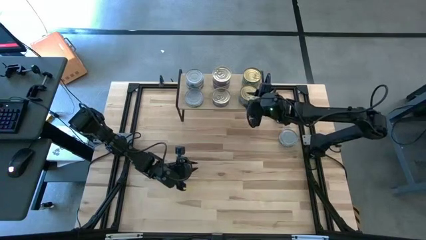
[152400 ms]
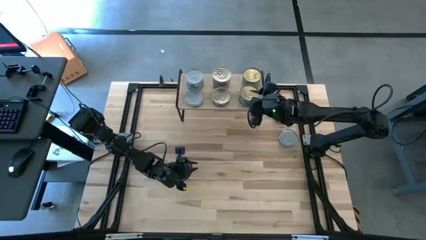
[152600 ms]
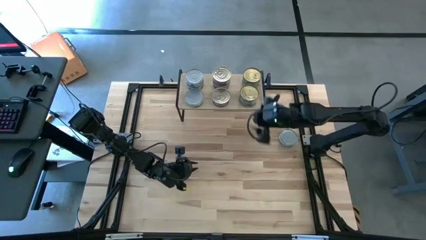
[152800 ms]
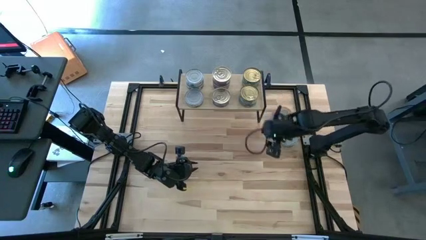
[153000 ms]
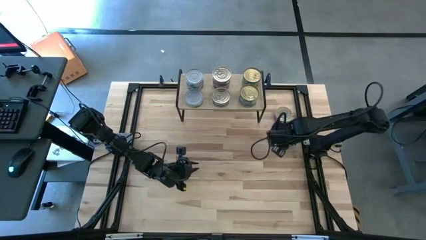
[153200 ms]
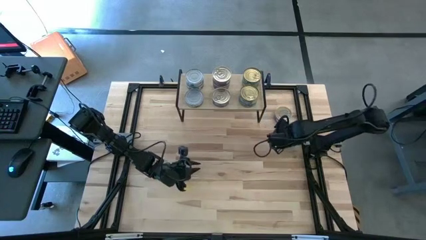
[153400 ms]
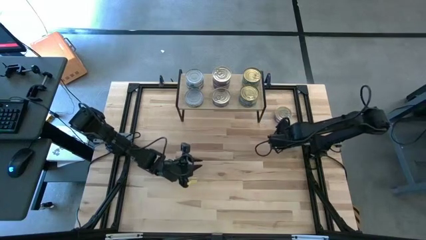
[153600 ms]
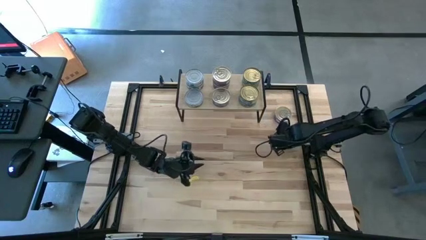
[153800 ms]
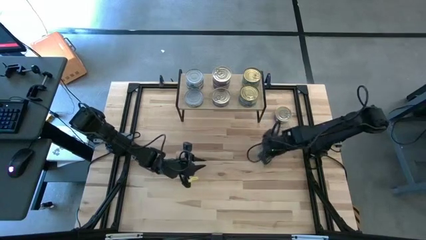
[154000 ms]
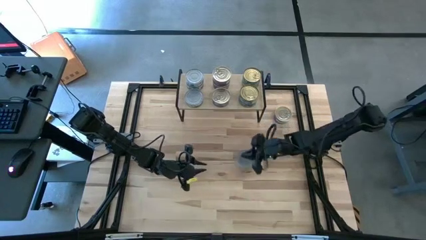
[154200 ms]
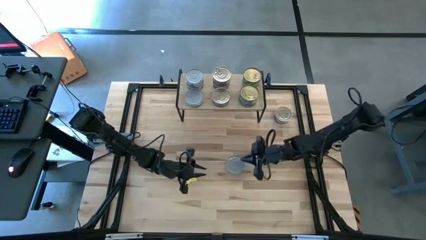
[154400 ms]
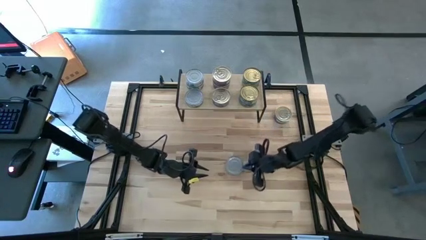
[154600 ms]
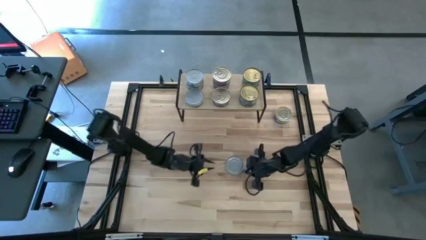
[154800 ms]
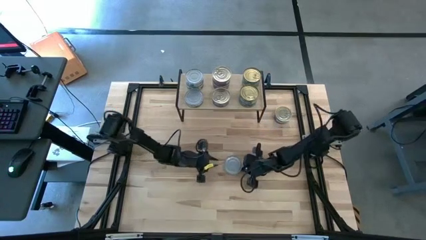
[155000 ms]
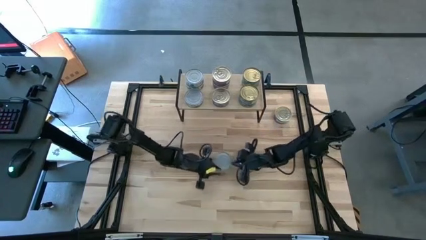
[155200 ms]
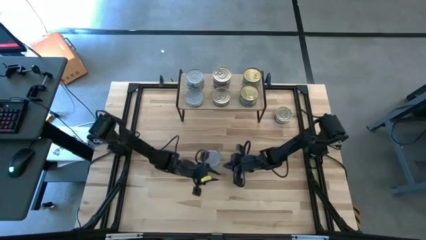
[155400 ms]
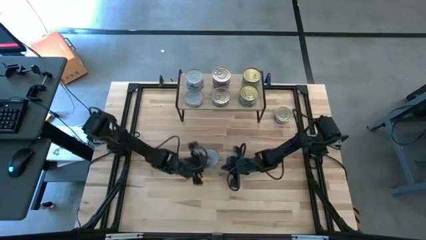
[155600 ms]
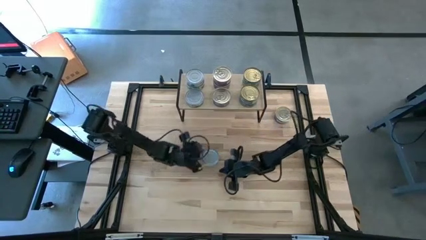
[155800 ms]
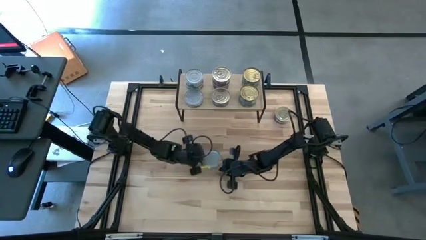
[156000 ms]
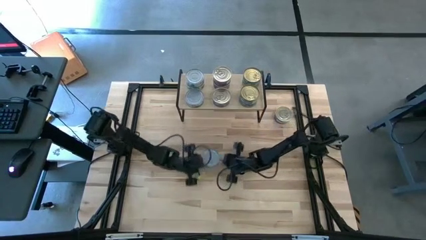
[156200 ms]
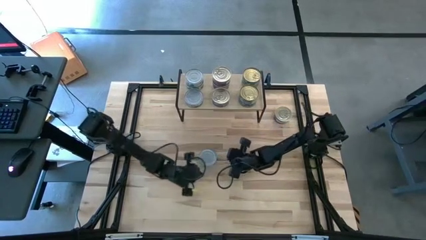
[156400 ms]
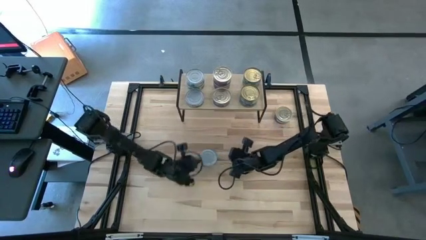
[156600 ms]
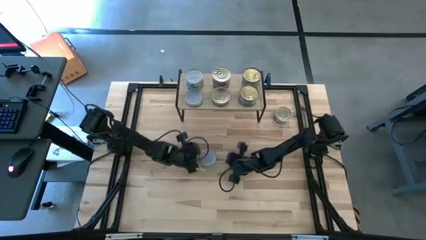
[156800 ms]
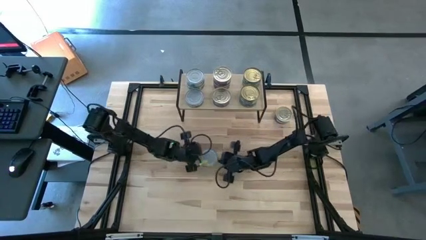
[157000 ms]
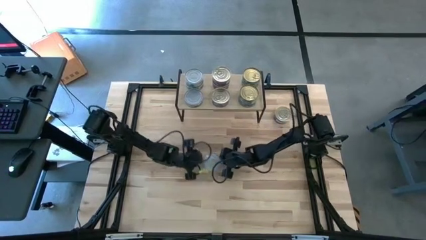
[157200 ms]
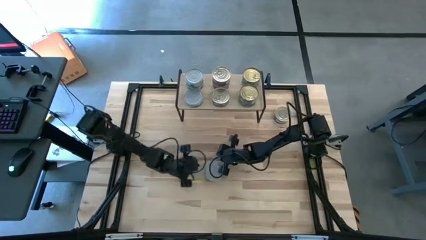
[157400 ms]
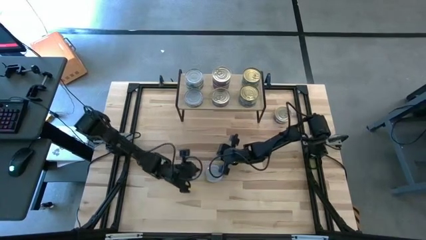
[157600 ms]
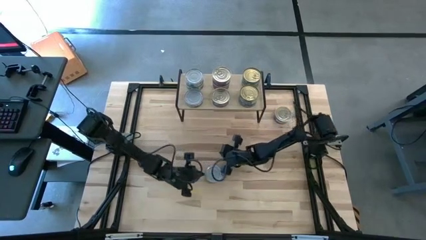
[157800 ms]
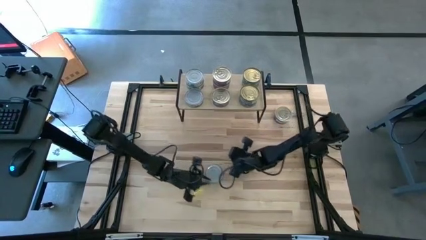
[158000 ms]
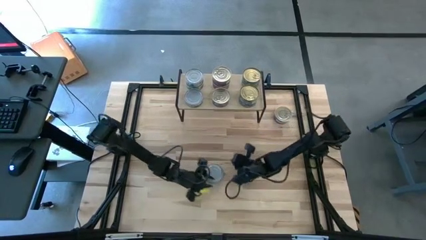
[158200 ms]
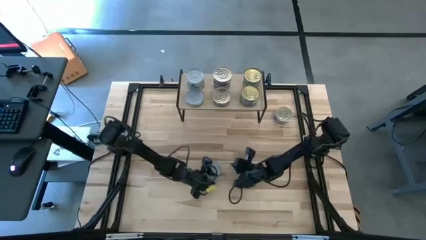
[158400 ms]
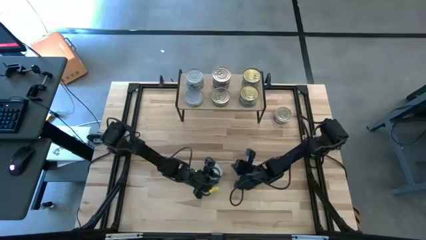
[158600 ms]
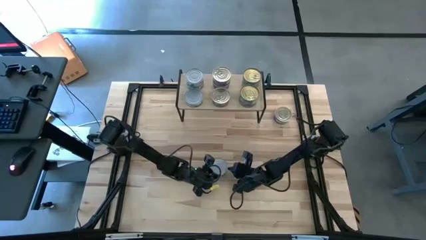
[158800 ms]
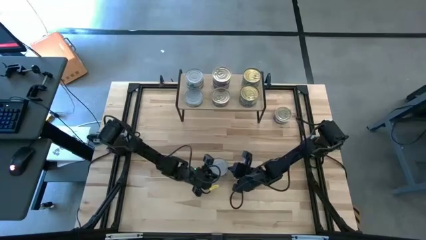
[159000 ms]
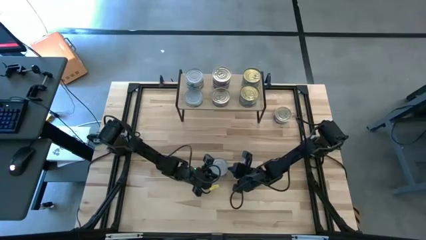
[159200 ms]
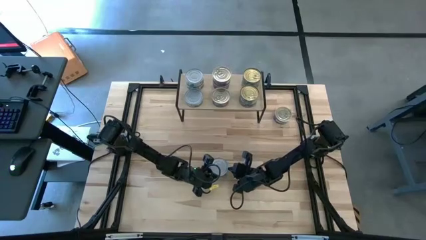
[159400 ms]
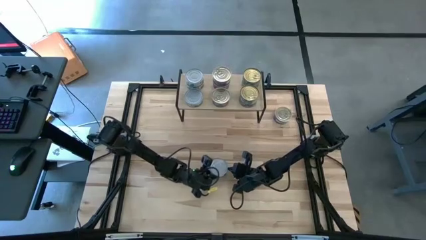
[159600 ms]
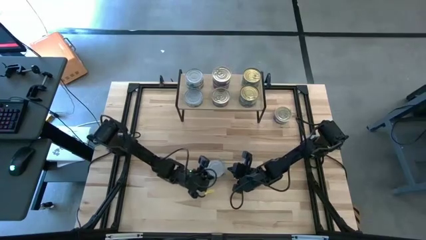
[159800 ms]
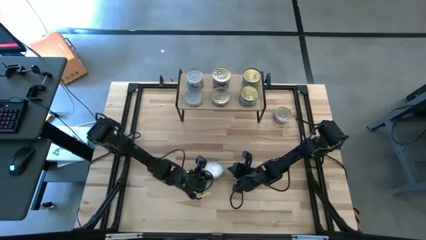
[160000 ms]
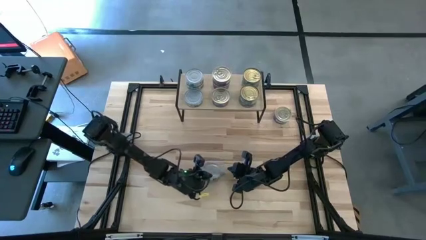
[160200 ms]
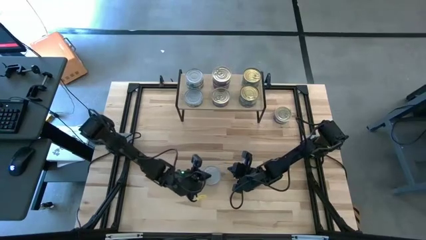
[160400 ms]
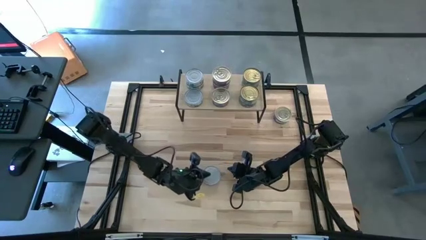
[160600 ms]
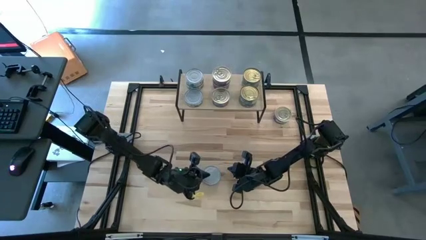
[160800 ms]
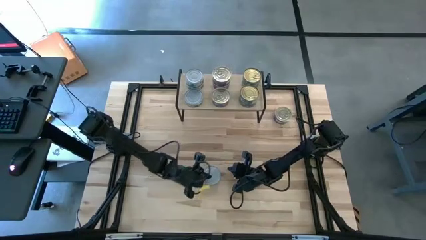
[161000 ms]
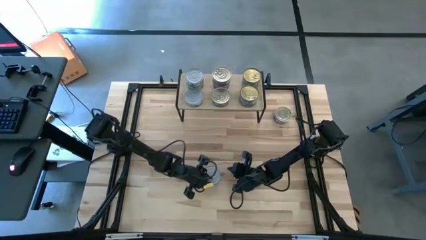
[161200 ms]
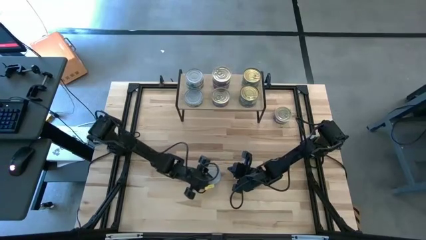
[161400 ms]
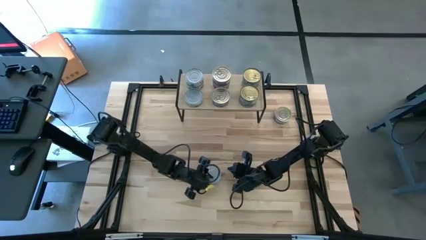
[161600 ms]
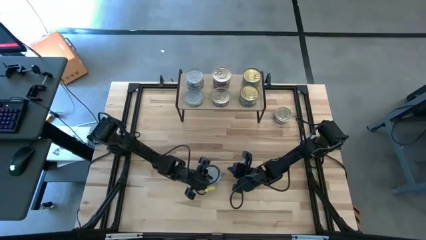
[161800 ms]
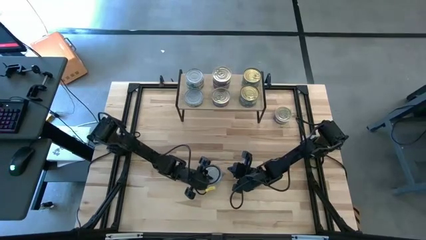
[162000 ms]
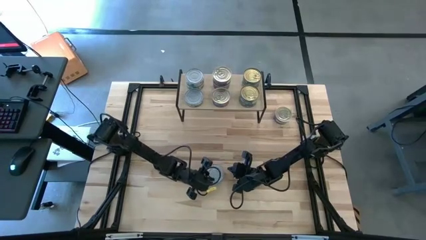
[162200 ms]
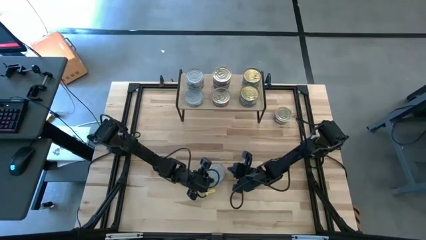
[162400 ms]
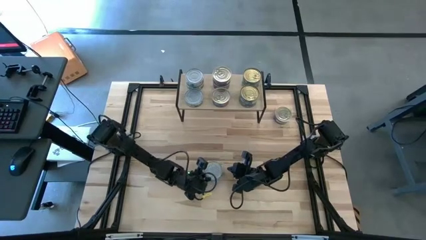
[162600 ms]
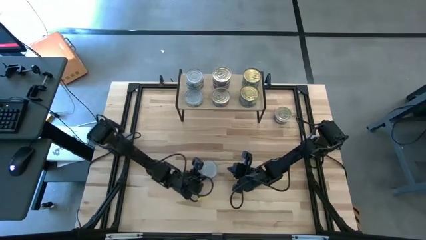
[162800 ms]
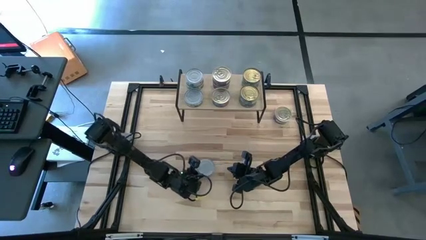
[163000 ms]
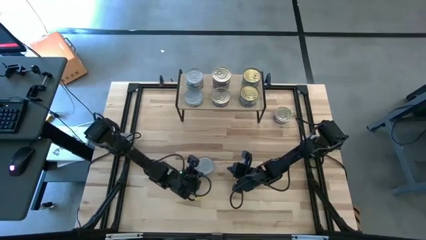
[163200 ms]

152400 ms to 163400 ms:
Task: Stack canned seafood by type on shelf
Stack the green white tuna can on top of the other green white tuna can on the shelf

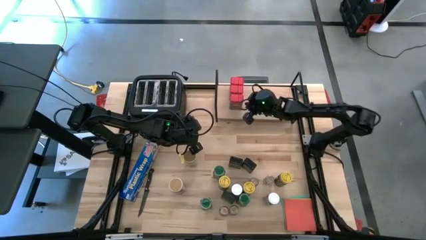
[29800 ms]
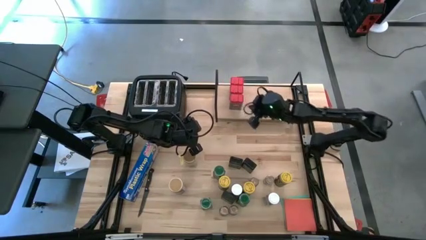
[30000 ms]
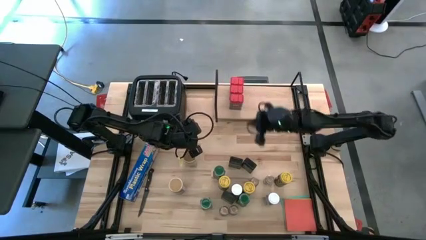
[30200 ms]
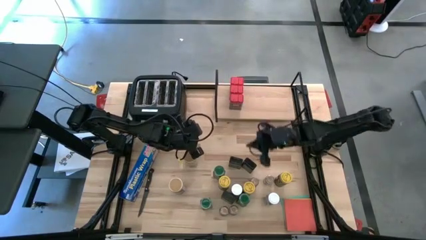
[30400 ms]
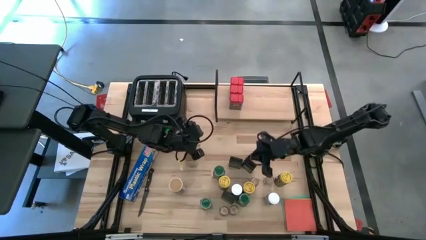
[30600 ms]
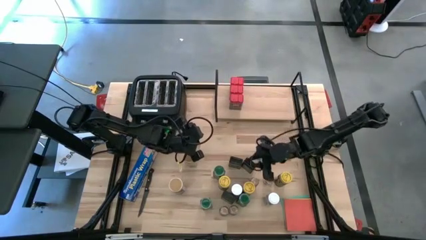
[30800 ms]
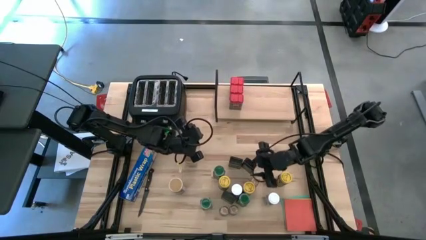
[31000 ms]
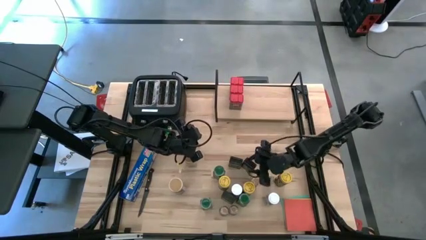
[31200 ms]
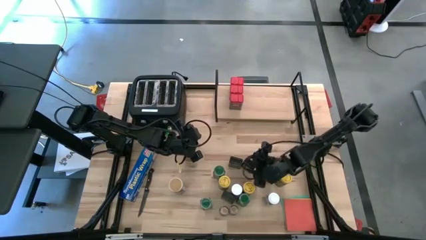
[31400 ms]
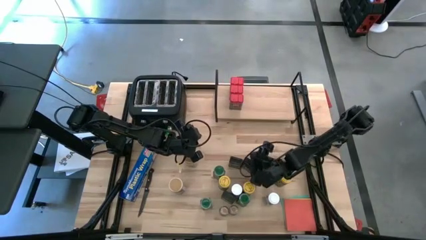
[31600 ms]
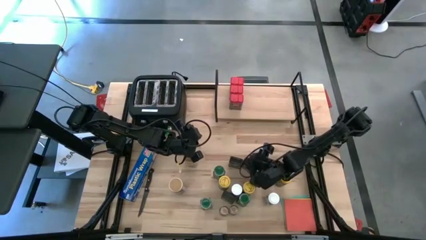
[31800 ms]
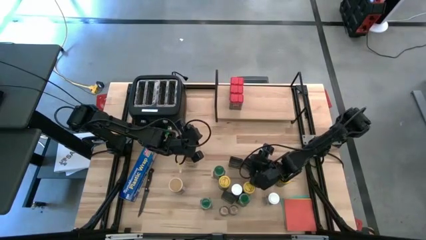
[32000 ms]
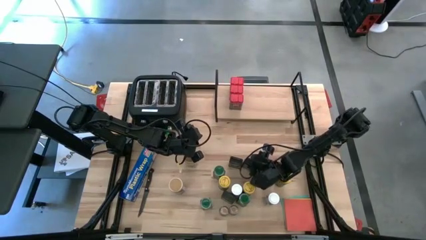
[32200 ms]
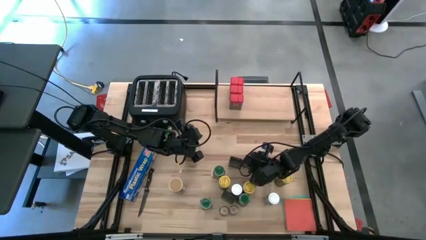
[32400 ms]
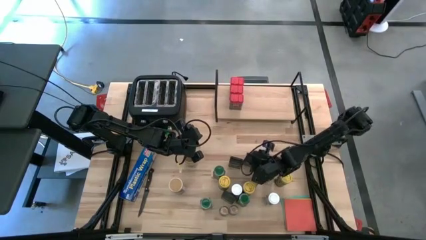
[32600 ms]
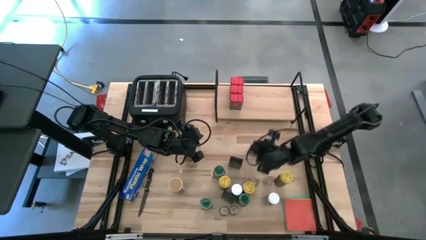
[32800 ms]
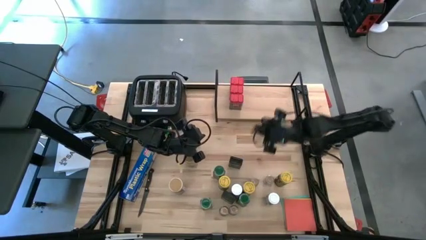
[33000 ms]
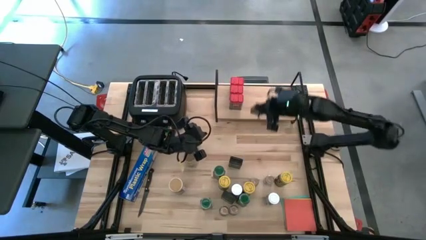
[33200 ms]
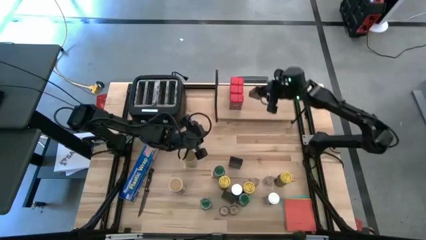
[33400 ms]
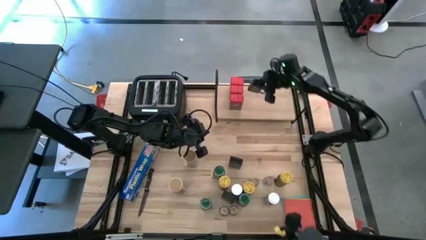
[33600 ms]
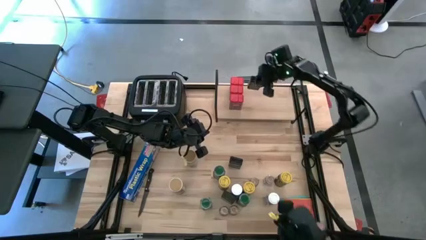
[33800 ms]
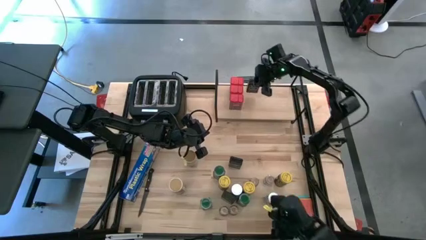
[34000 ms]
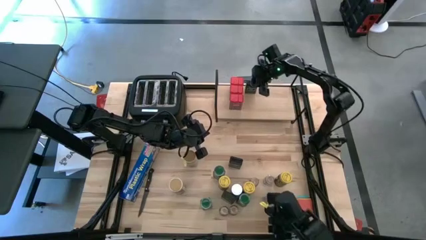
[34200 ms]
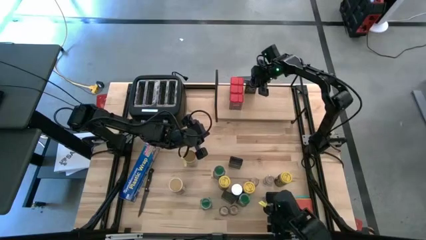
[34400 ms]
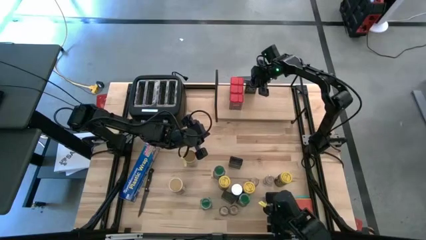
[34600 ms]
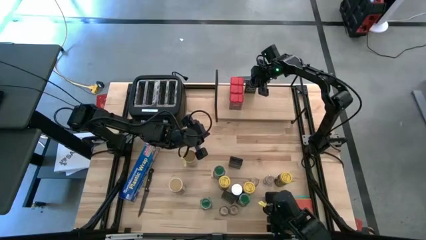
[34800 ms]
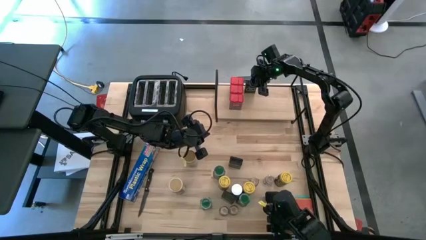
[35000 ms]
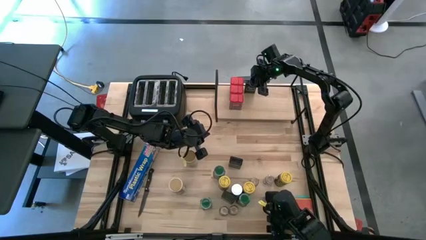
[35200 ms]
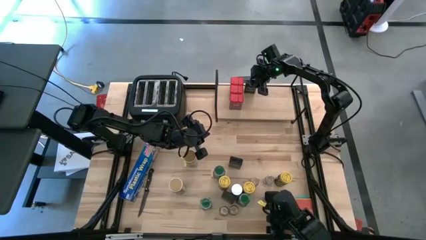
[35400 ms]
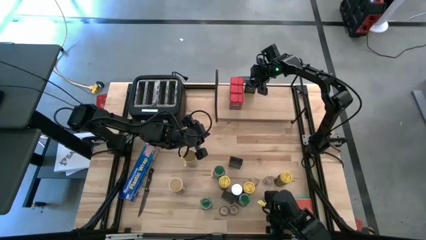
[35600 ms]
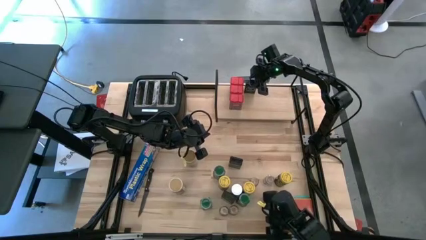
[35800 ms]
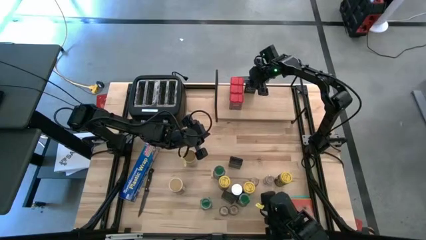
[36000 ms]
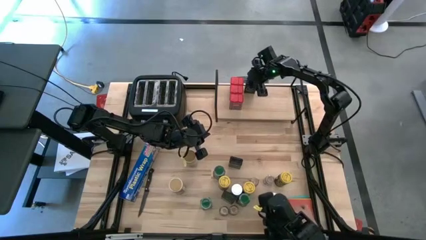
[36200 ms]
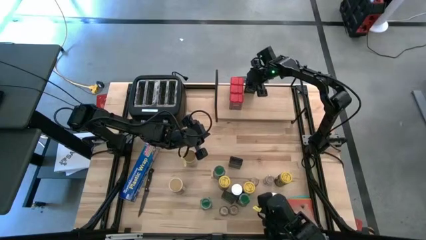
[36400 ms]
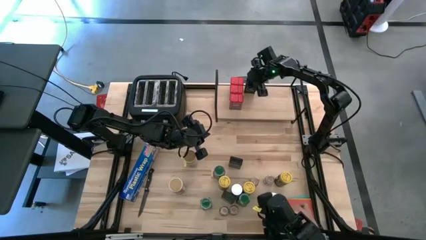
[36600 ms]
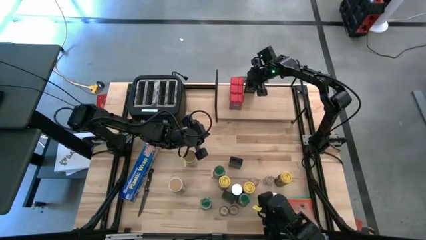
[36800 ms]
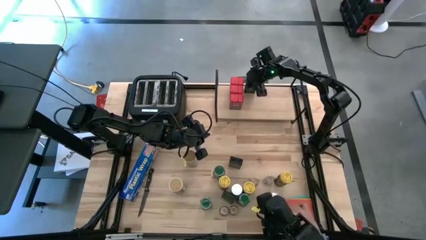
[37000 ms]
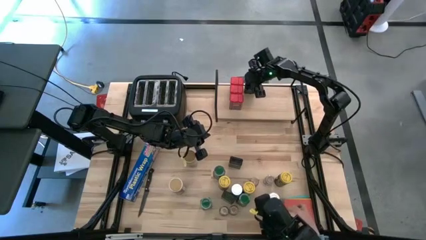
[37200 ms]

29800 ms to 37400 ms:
Task: Shelf spices
Put the top right black seasoning can on the shelf
